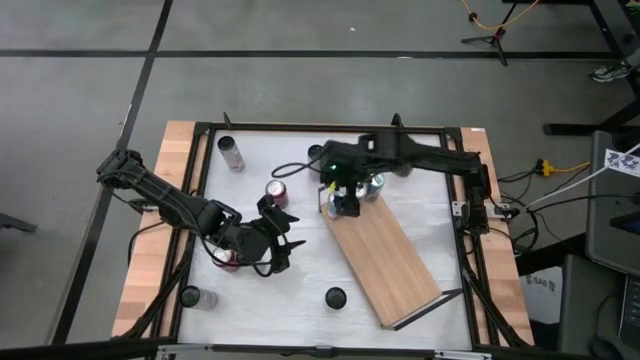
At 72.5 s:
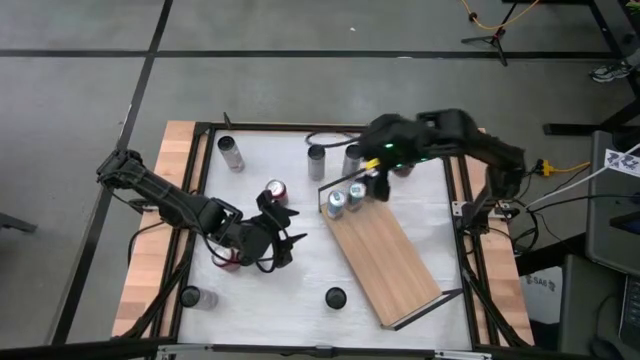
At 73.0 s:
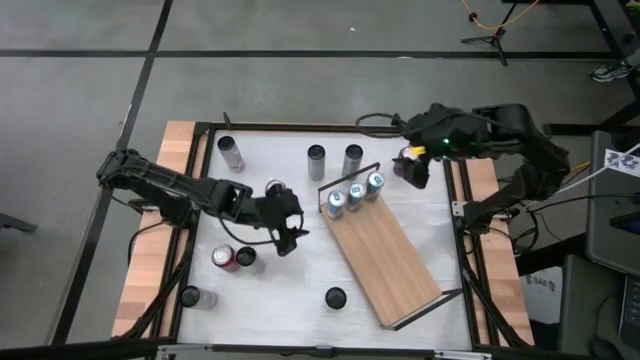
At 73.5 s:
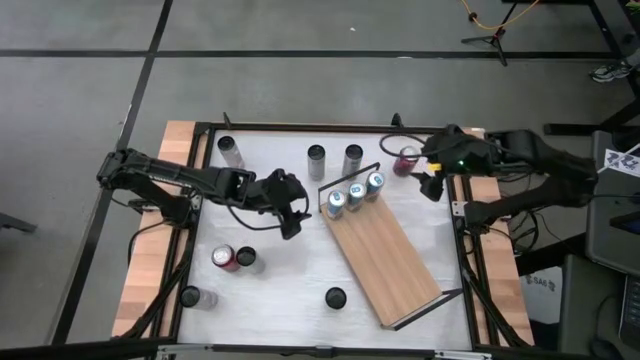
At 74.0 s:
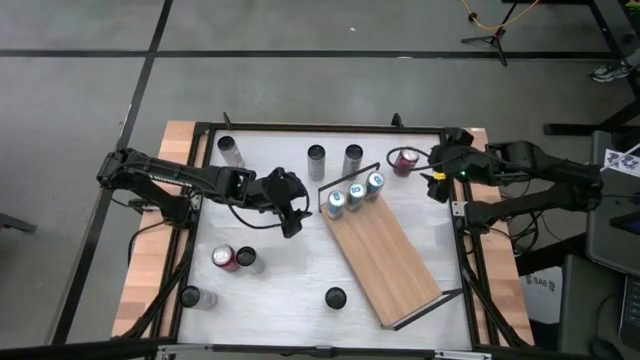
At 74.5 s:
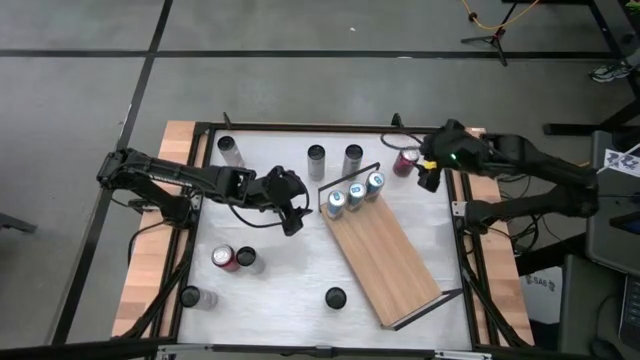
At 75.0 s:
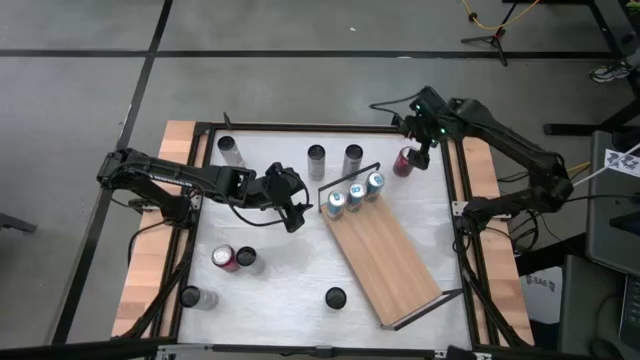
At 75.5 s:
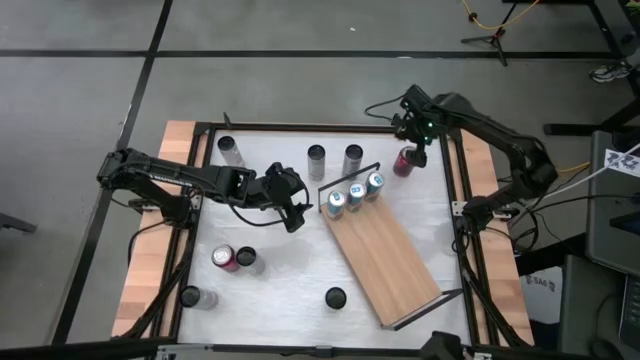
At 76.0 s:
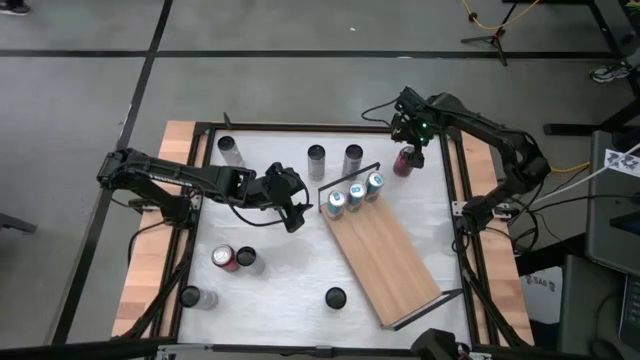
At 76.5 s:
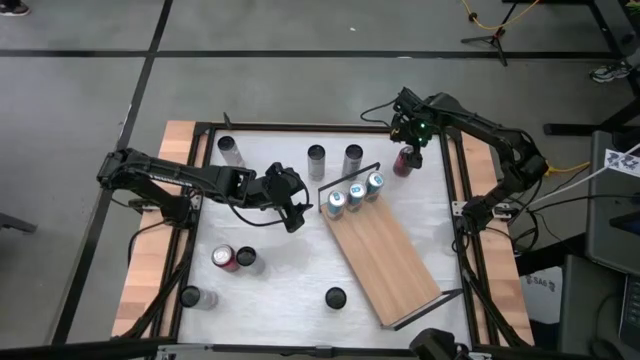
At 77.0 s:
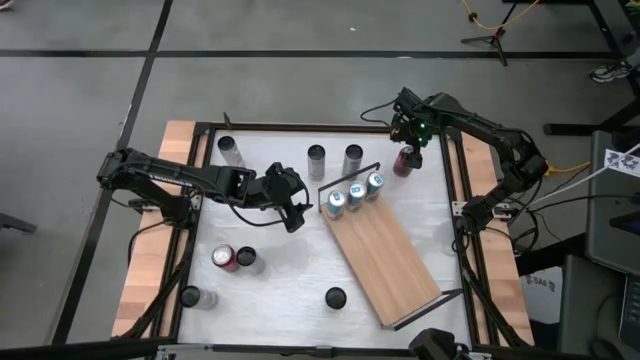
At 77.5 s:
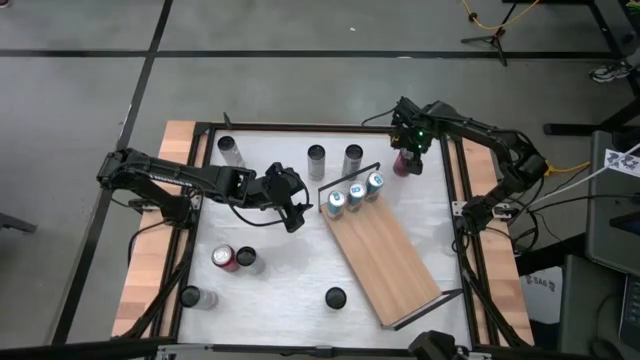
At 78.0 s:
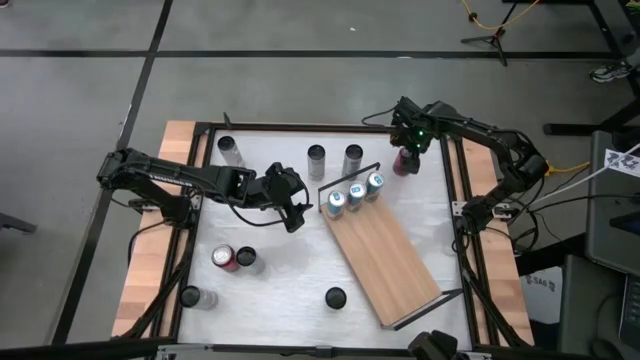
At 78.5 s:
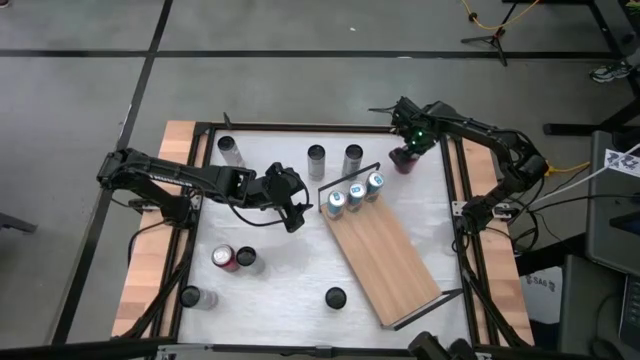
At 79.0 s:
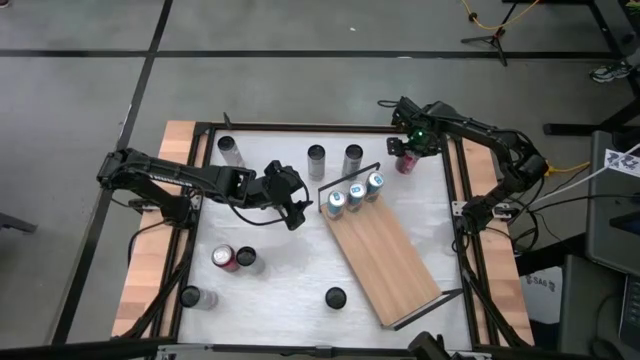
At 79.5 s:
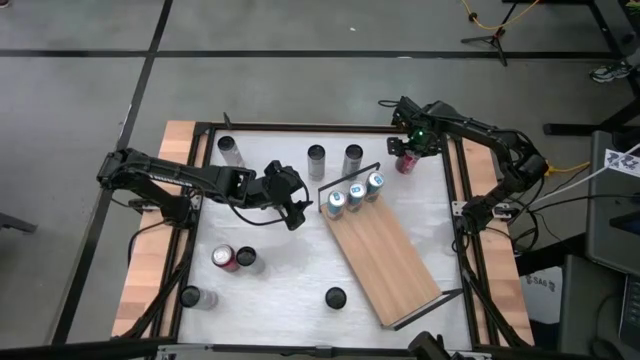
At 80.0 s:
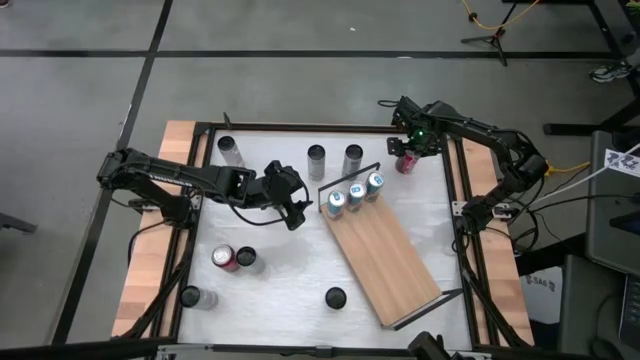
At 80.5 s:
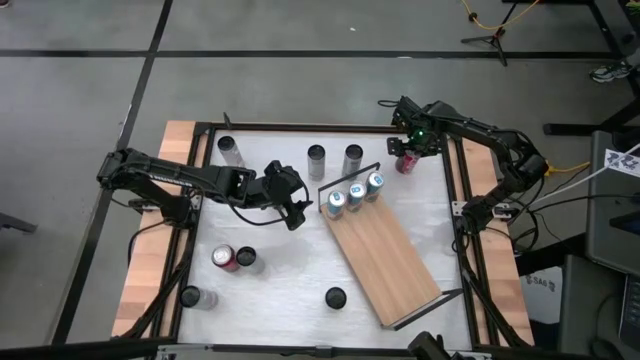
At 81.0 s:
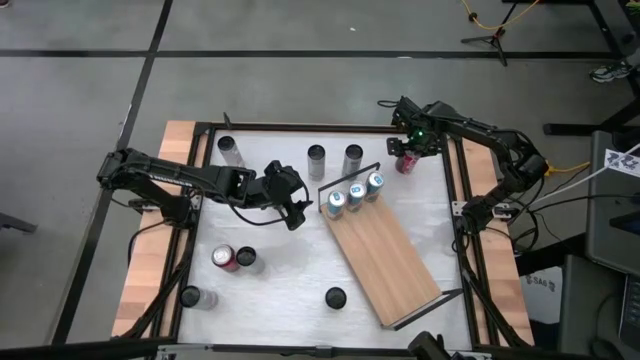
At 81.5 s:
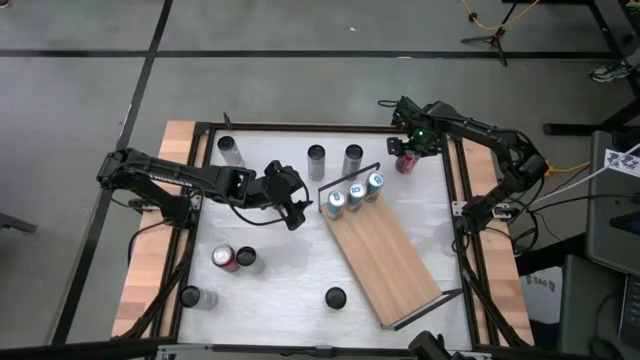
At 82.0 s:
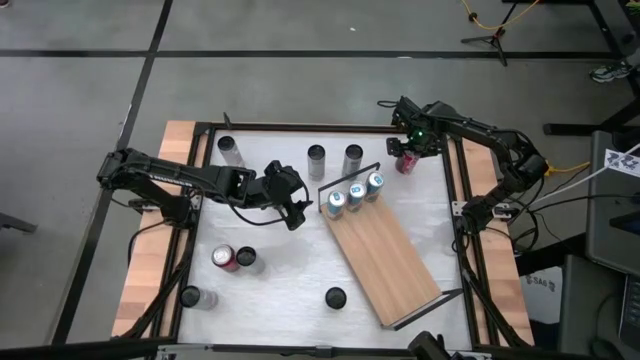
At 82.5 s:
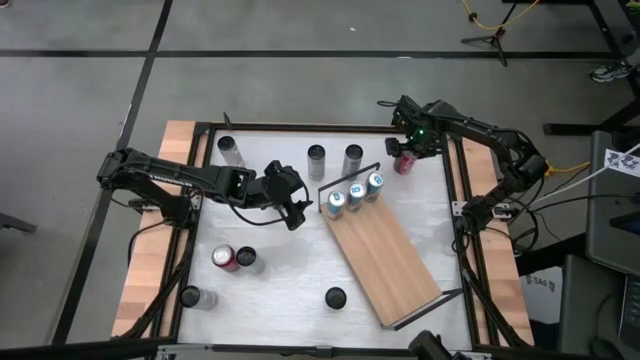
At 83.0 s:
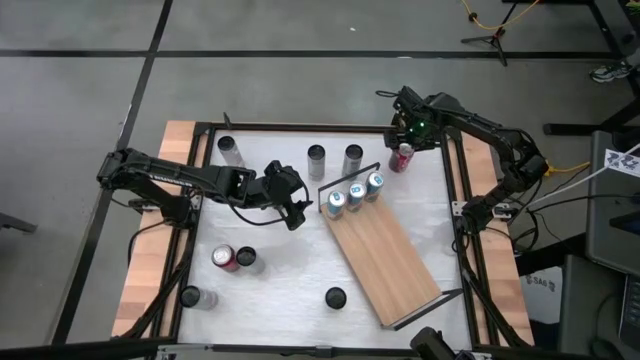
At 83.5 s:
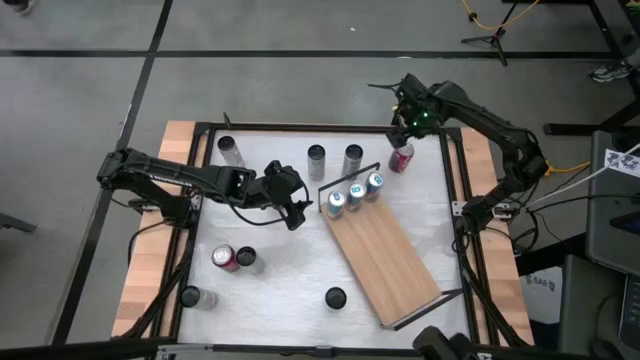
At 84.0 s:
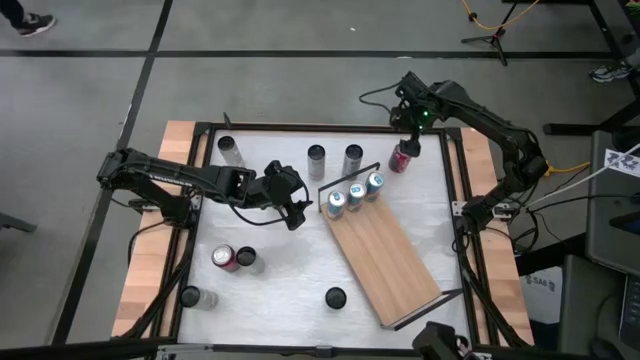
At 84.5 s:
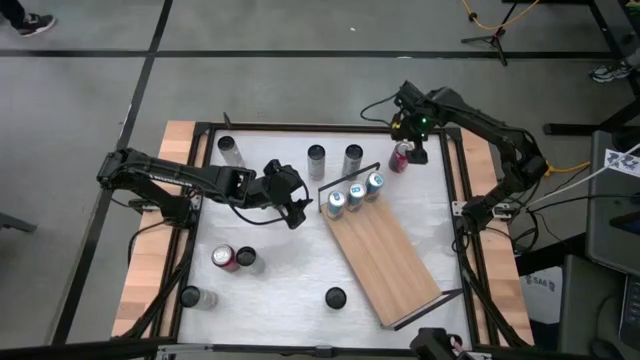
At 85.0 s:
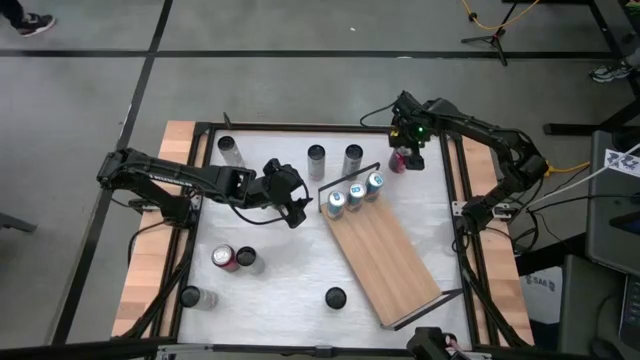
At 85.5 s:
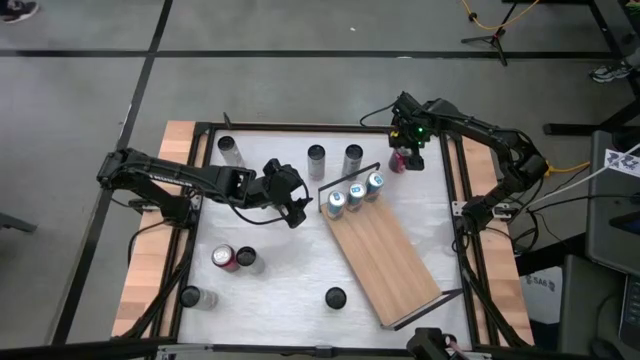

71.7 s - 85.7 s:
Task: Place canned beverage on shelf
Put the red soda can on the shelf

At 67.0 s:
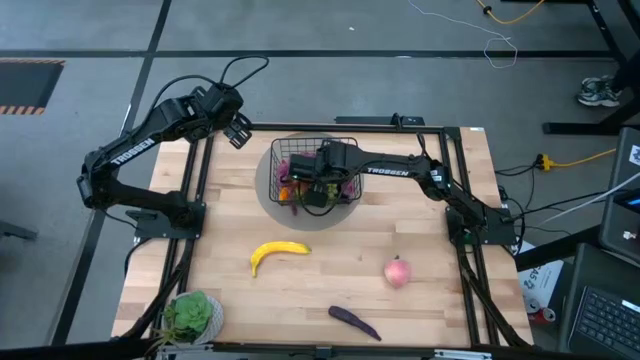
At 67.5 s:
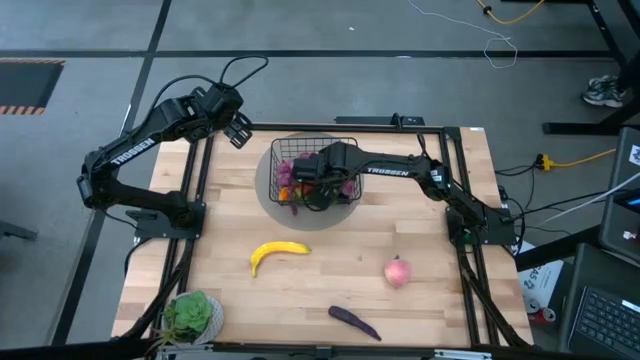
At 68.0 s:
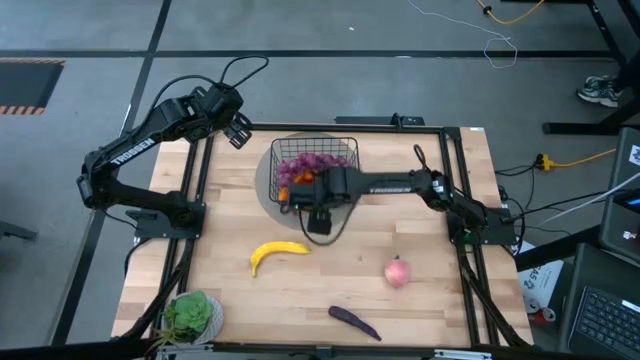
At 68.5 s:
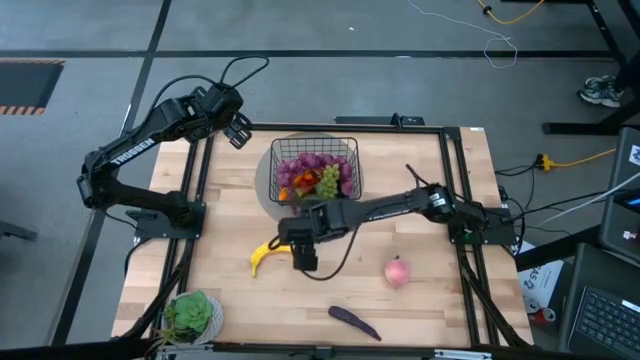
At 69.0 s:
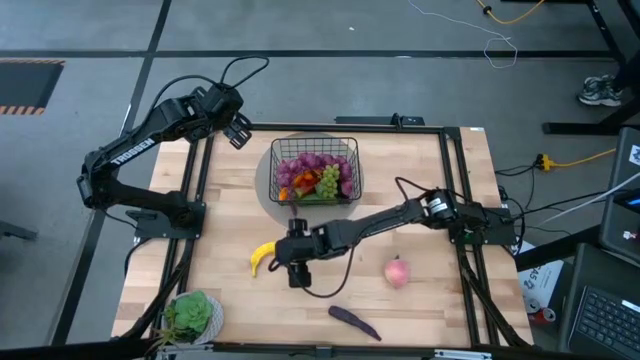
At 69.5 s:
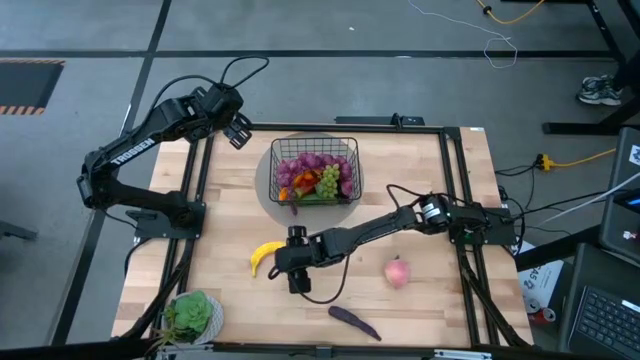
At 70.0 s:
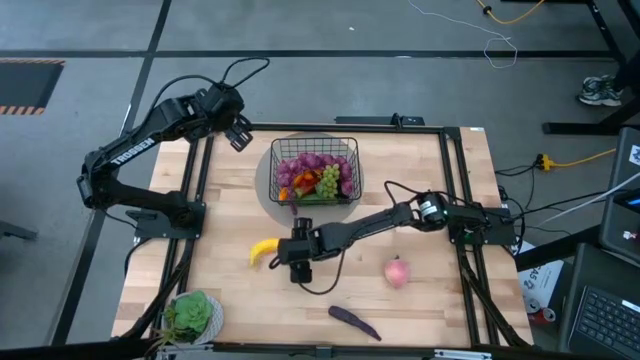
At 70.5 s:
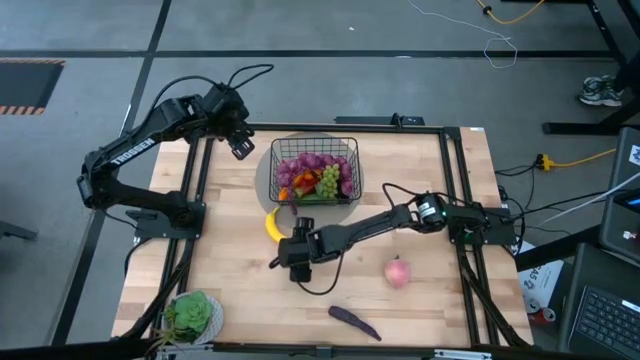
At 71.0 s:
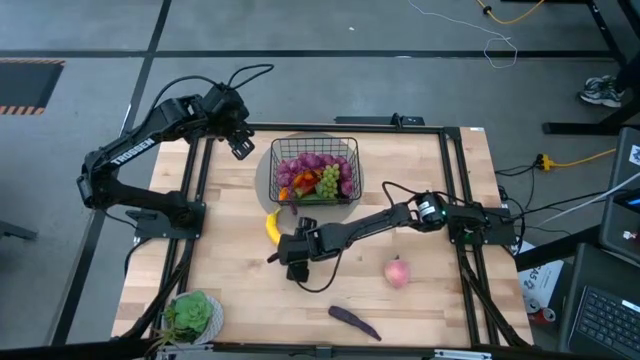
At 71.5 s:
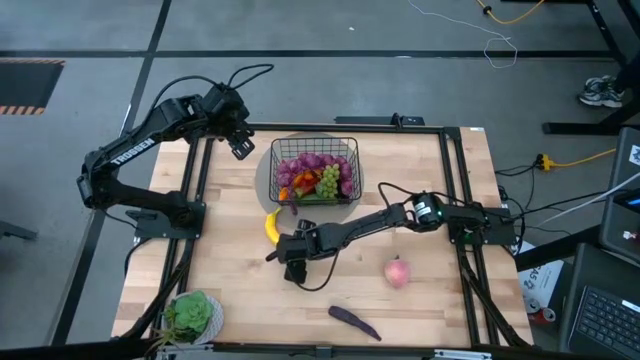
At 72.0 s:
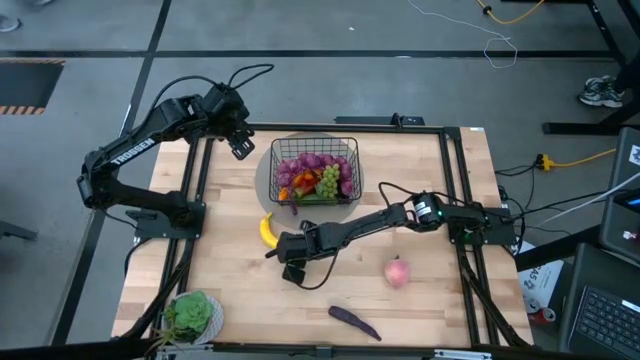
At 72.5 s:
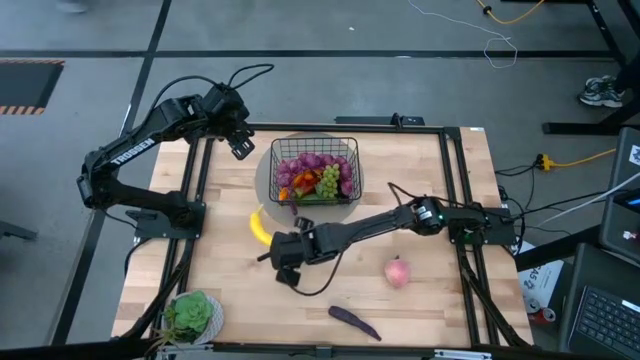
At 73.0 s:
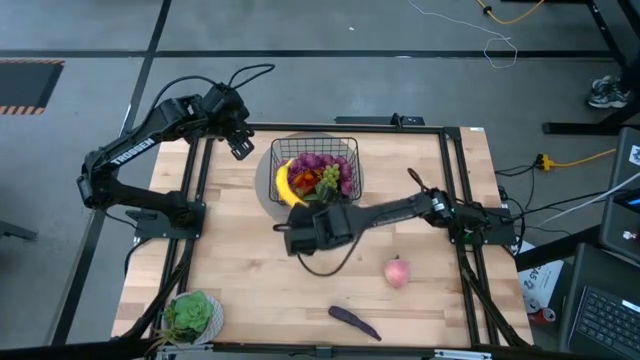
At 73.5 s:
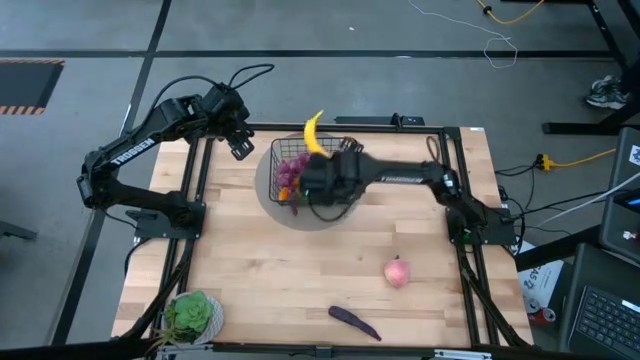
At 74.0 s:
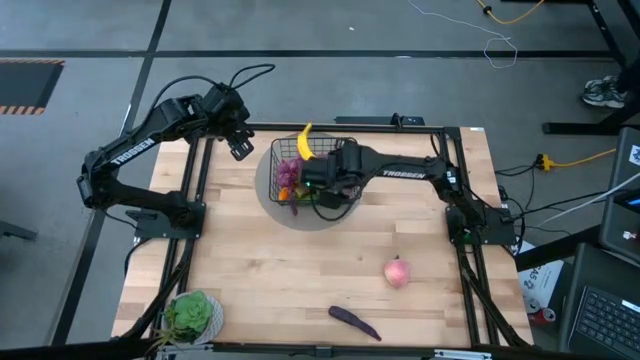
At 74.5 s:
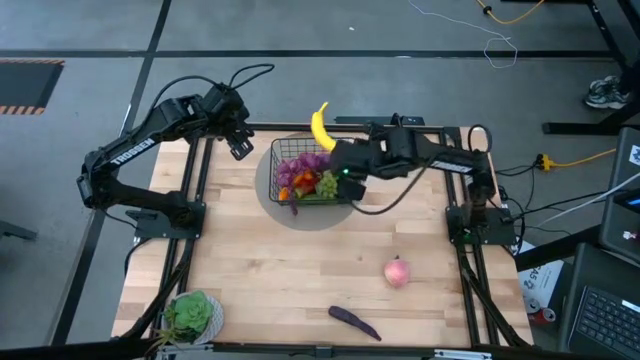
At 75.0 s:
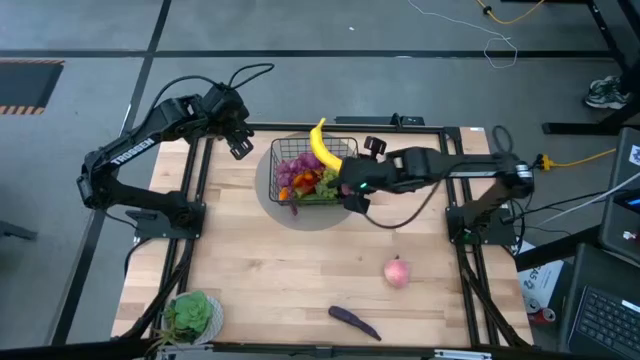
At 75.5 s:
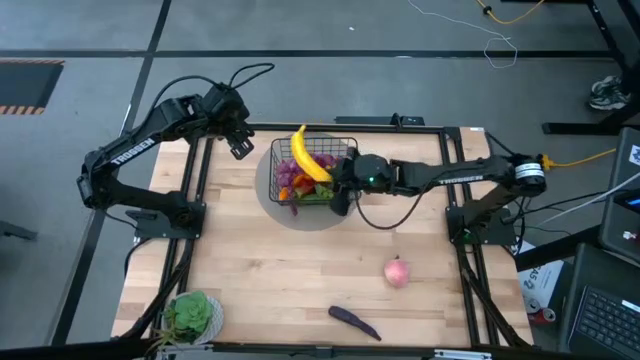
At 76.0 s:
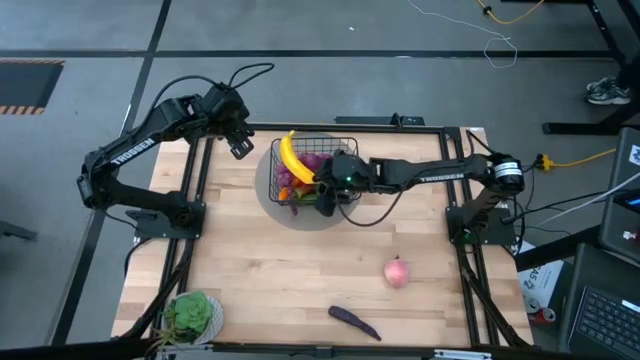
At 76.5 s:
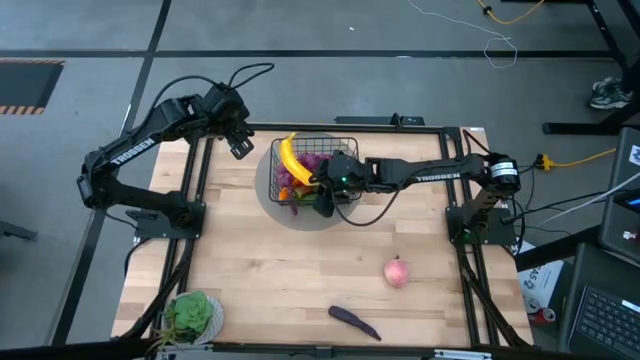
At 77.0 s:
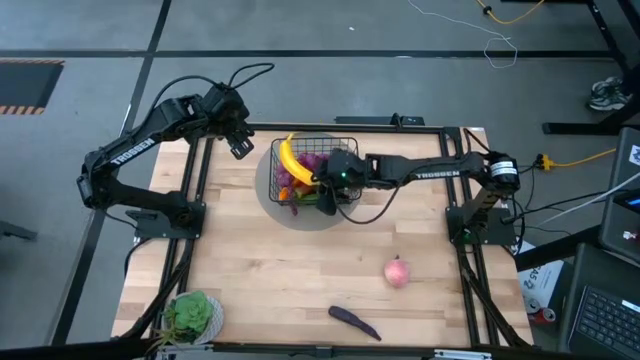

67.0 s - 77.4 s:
Task: Build produce basket
Put the yellow banana into the wire basket
